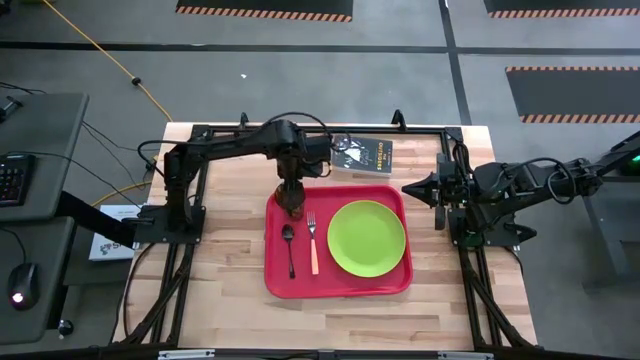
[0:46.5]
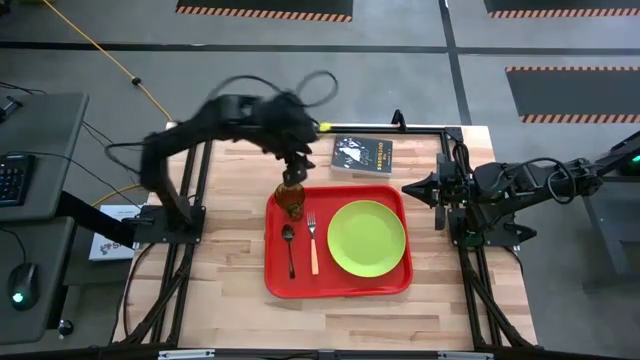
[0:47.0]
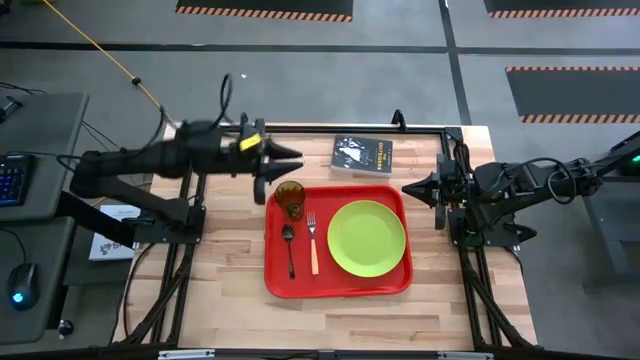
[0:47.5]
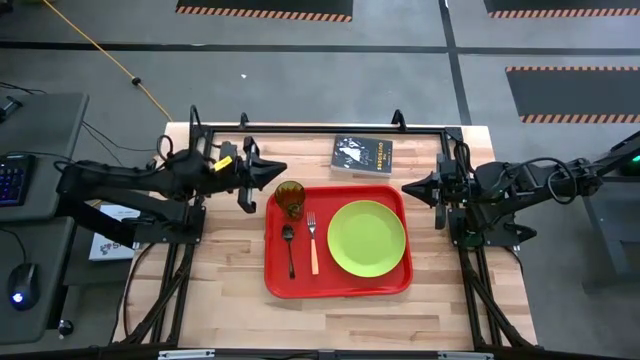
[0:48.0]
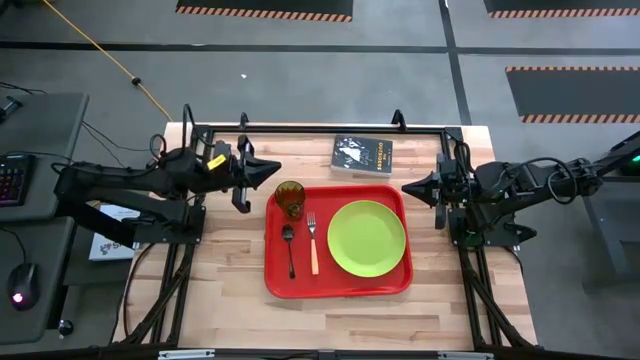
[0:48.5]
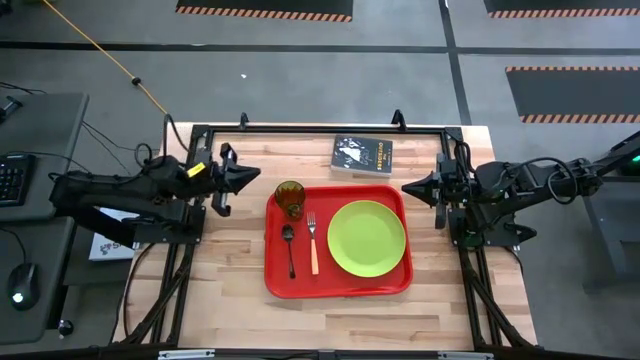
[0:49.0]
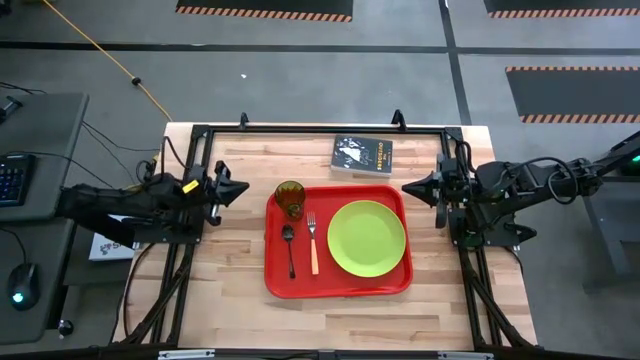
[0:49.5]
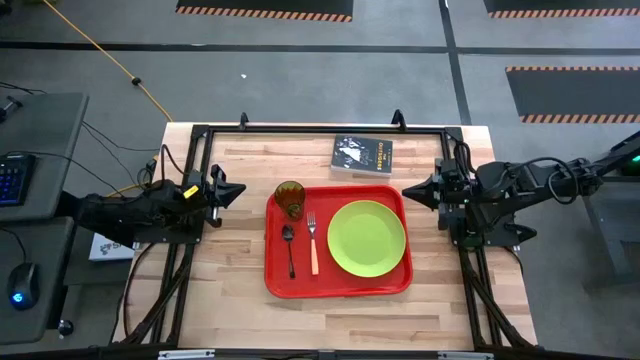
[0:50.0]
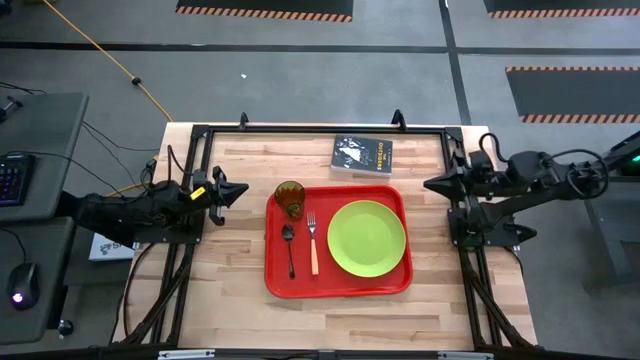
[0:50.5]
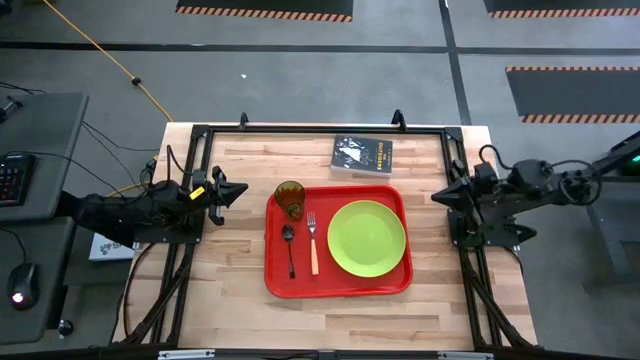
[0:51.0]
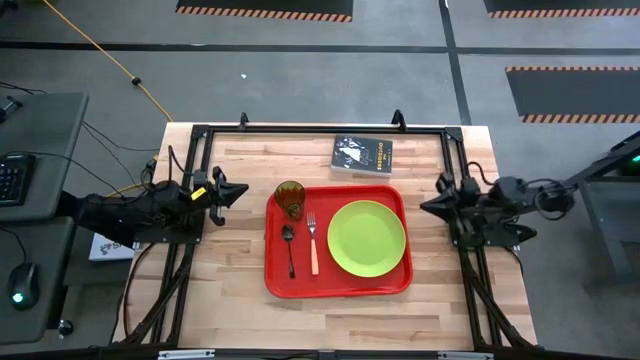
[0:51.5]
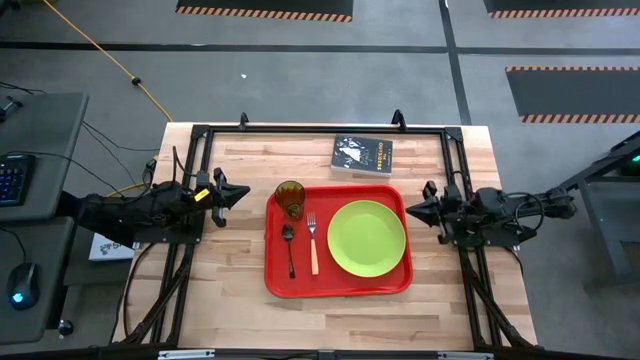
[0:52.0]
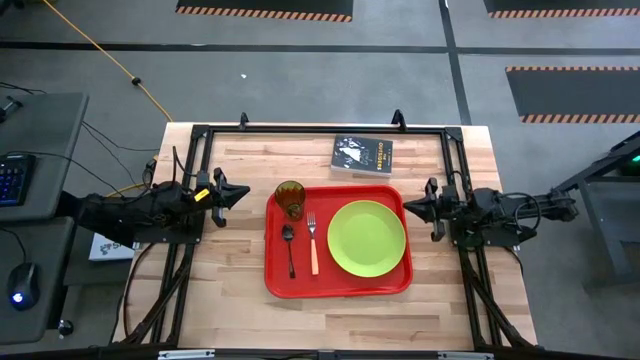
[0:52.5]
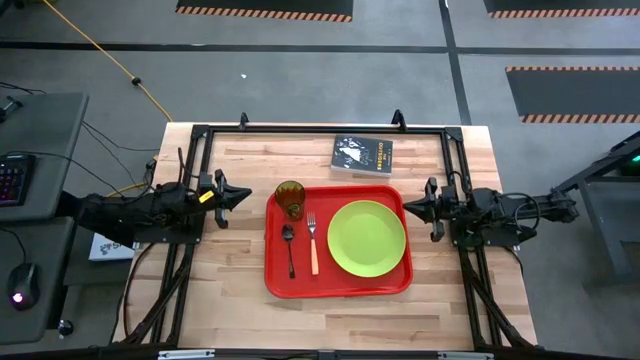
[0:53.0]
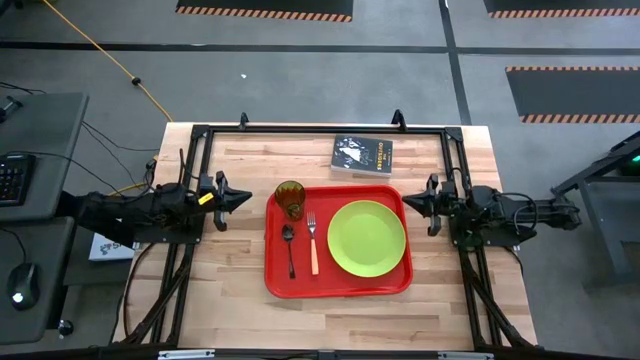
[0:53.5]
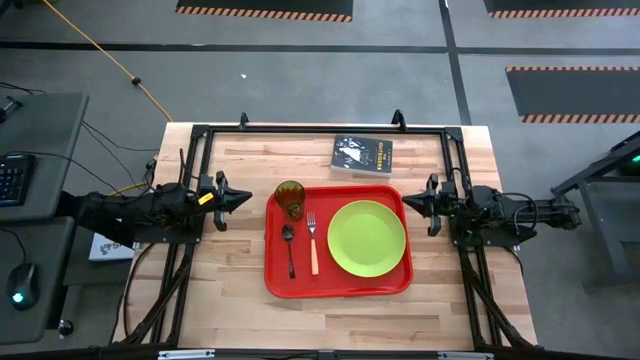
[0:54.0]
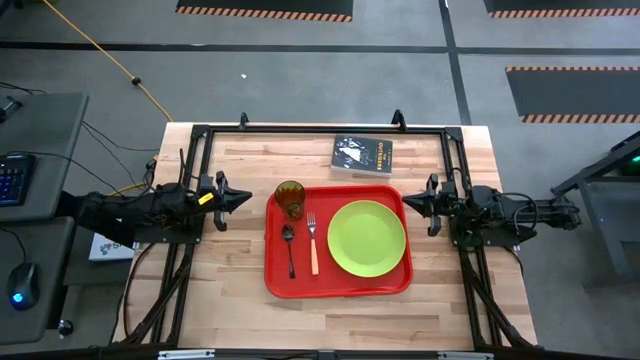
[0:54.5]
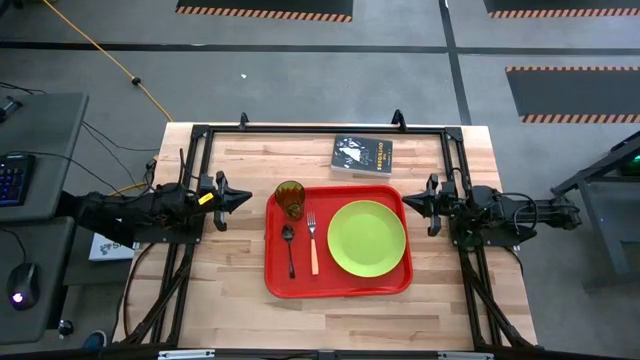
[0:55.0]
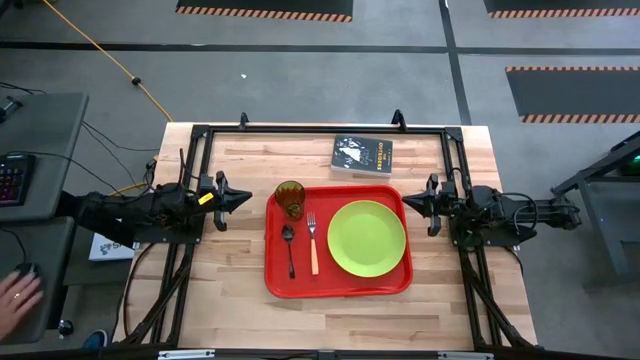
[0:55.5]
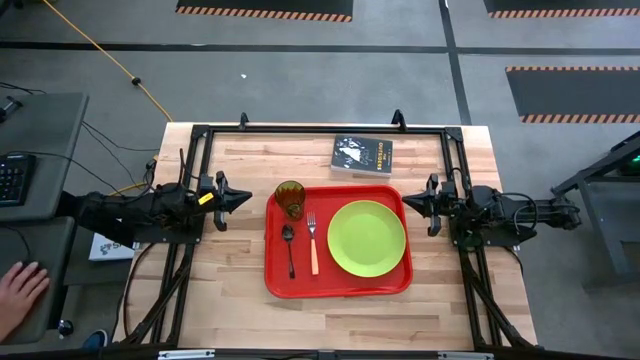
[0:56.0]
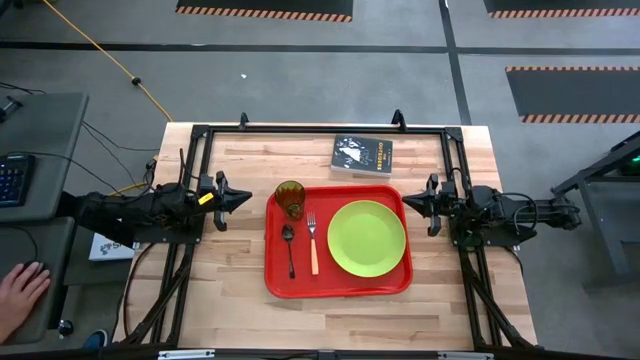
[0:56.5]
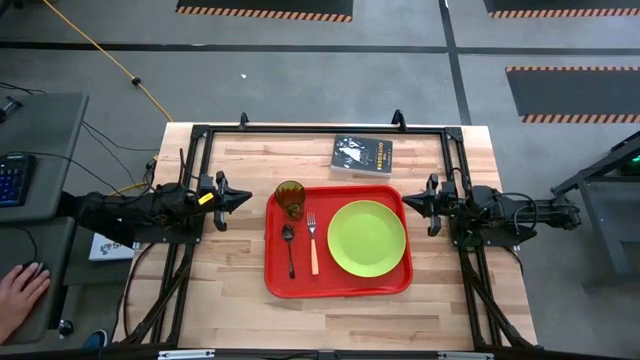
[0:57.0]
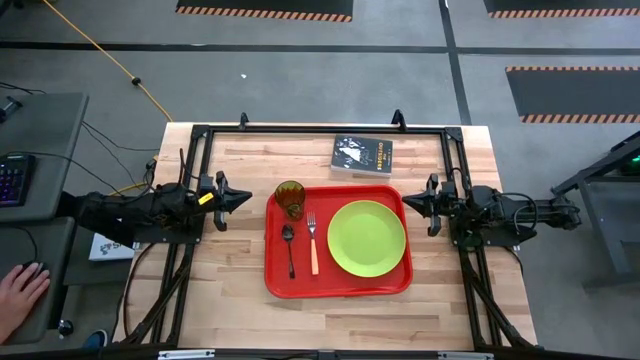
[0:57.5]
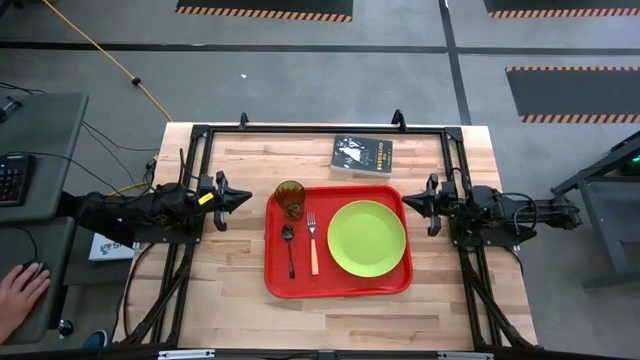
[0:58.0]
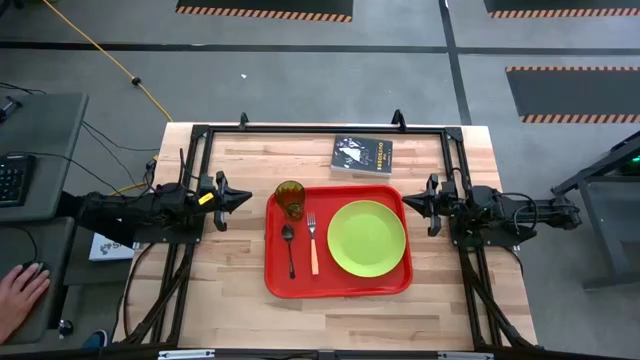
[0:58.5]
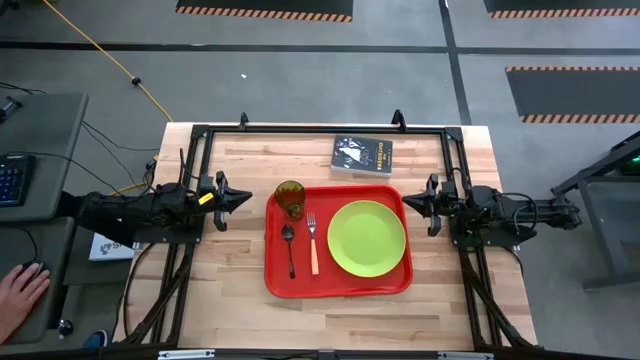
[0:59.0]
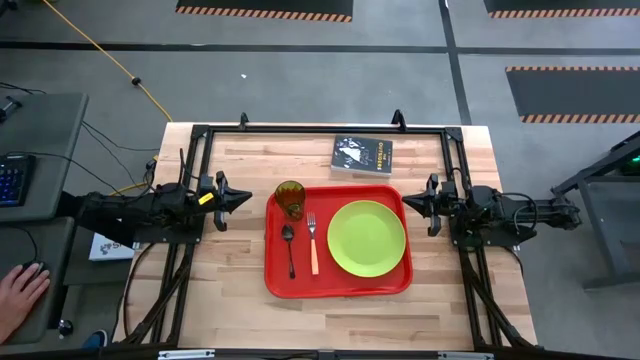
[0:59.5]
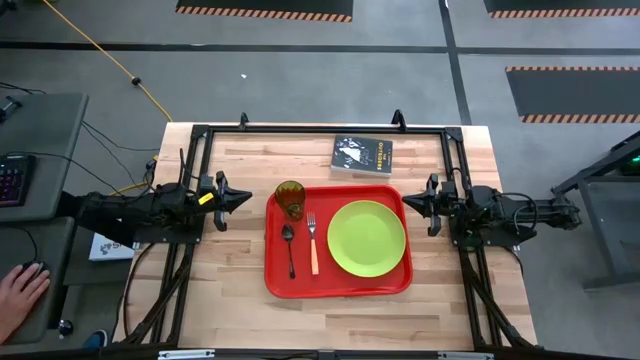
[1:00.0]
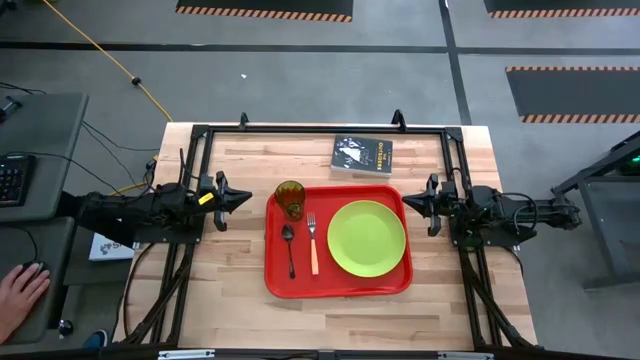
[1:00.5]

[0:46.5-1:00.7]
Task: Pick and place plate/cup/fork/spoon on tray
Return to Home Position

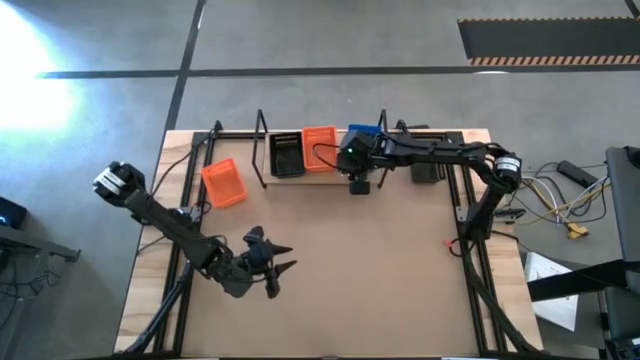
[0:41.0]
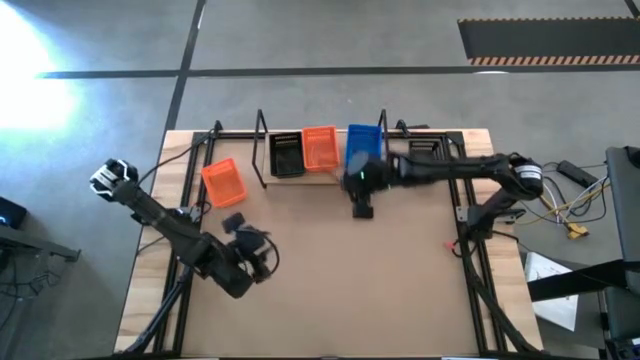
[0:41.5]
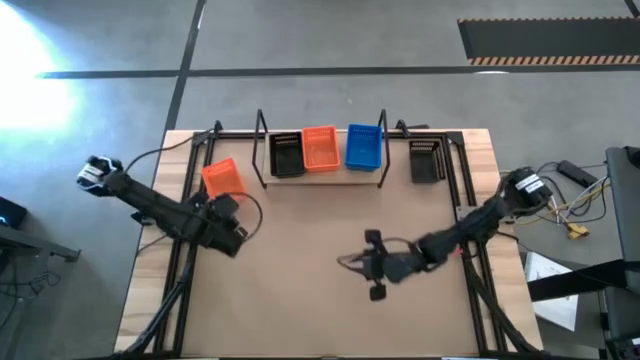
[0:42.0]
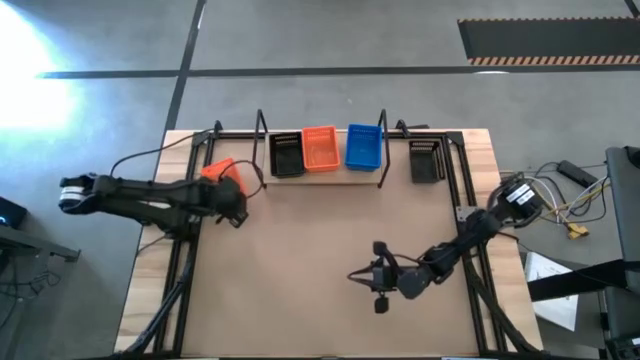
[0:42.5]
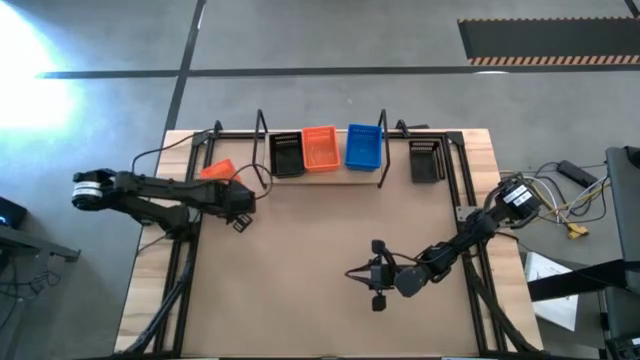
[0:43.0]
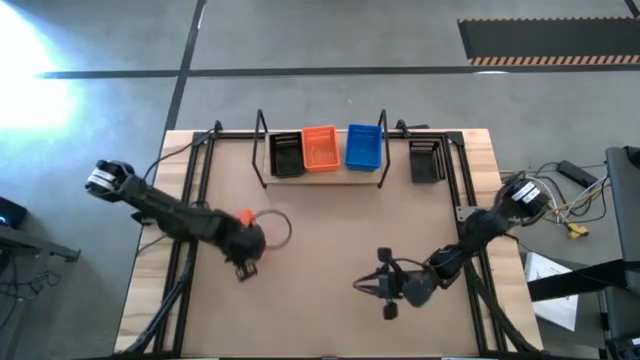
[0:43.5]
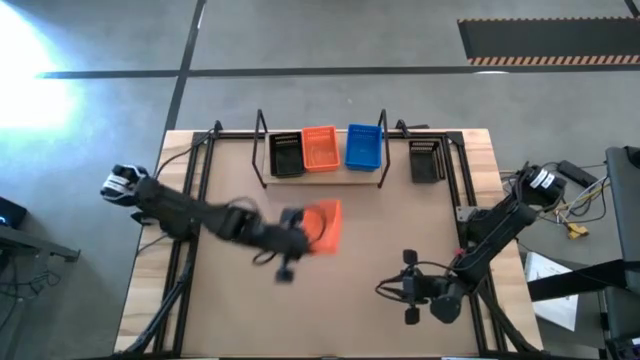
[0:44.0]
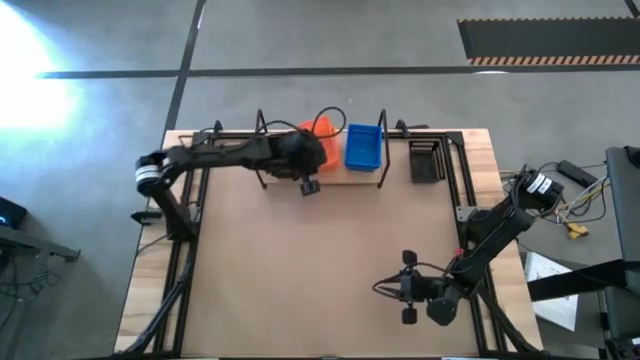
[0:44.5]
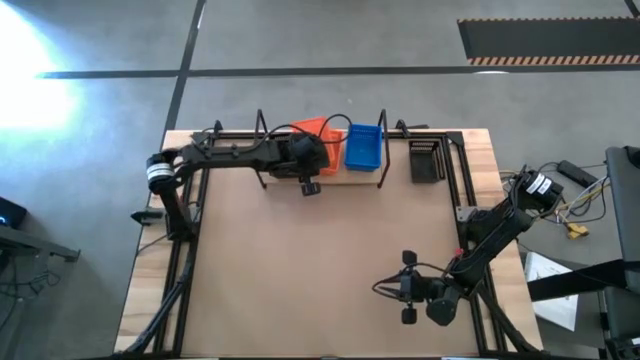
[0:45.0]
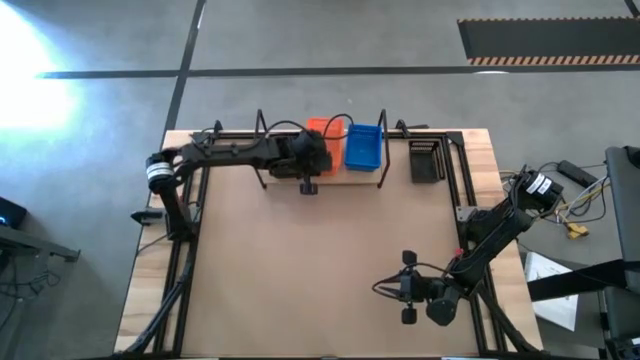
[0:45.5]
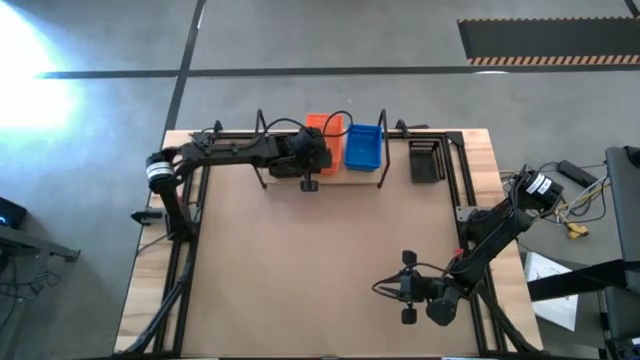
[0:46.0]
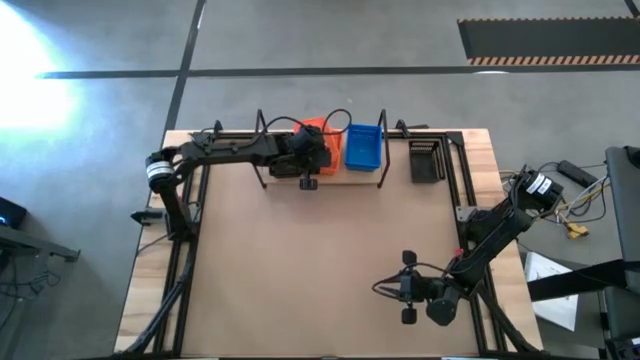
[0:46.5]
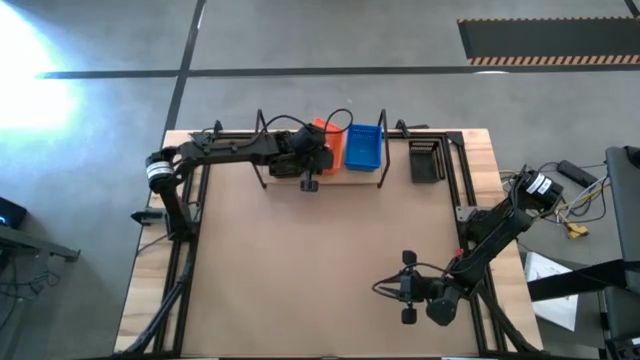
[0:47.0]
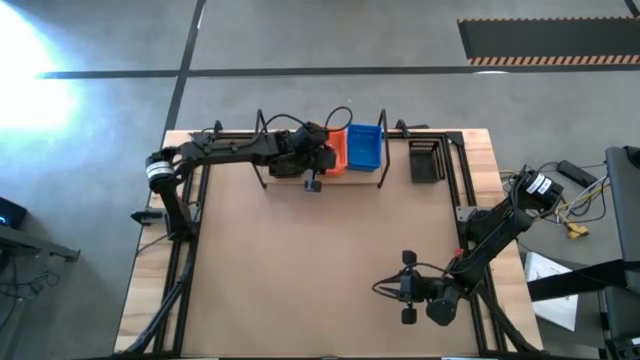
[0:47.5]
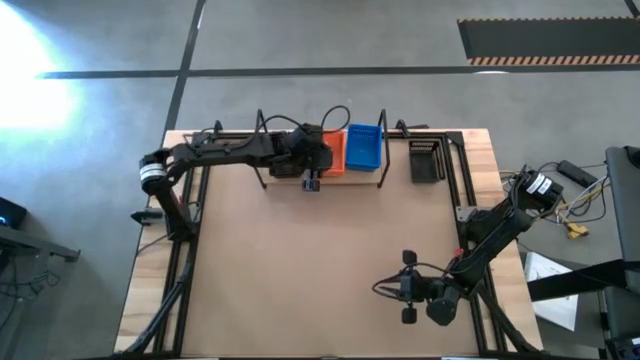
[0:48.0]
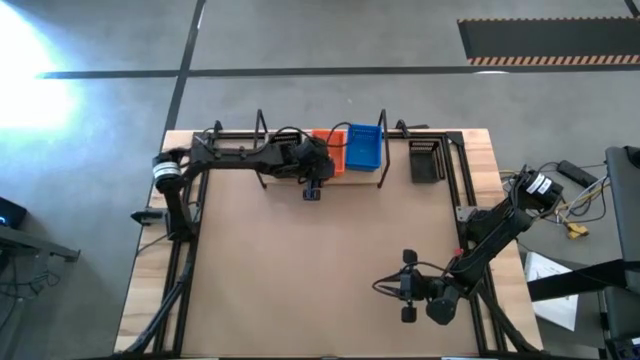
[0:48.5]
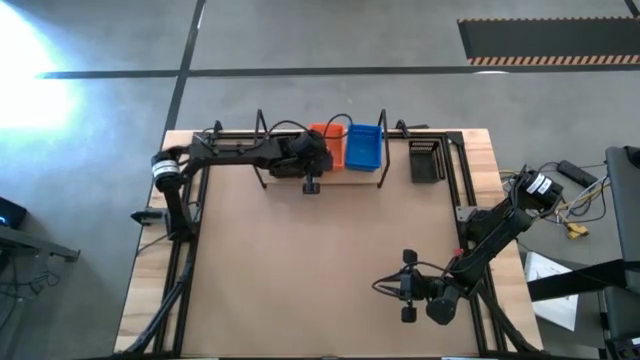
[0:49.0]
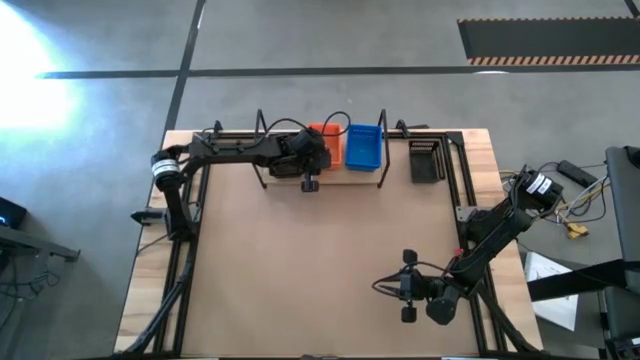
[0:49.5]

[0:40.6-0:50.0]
Task: Stack baskets on shelf by color
Stack the orange bin on the orange bins on the shelf
